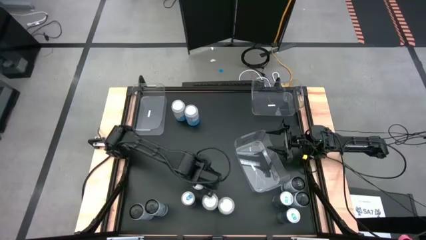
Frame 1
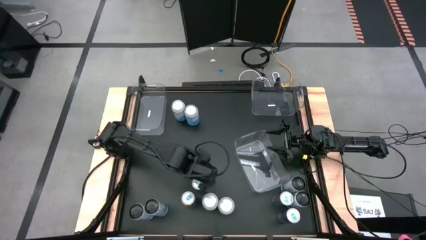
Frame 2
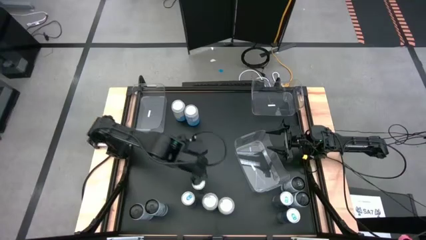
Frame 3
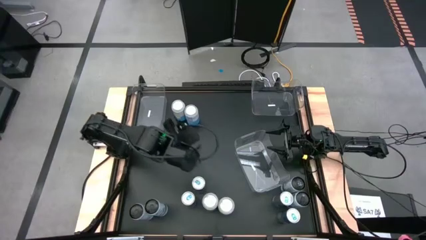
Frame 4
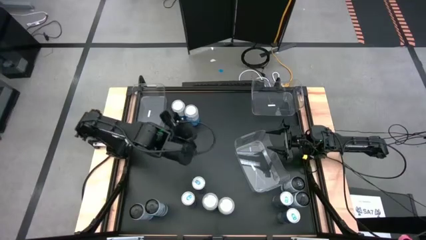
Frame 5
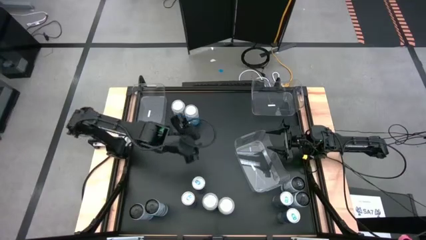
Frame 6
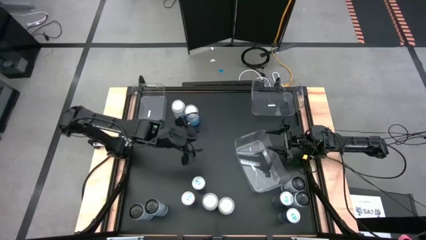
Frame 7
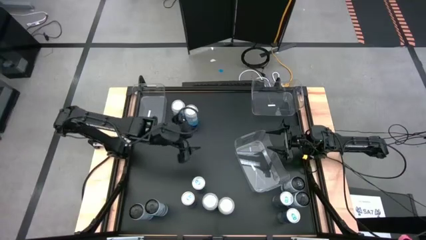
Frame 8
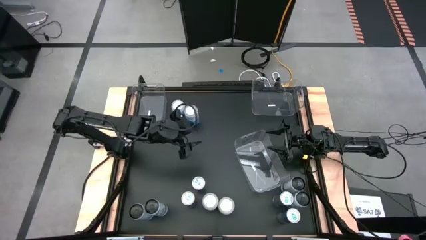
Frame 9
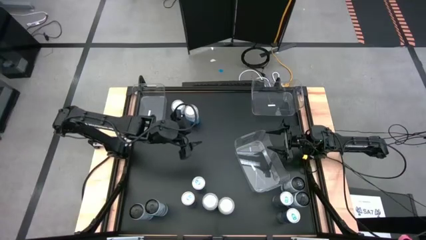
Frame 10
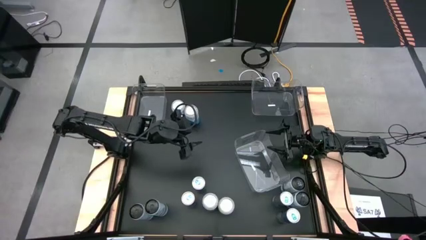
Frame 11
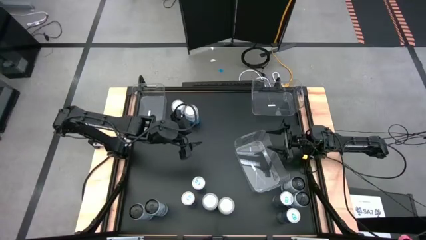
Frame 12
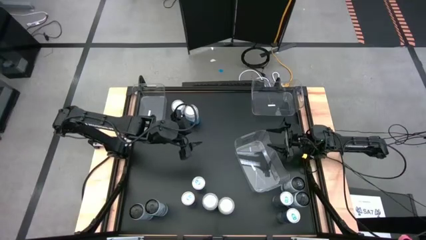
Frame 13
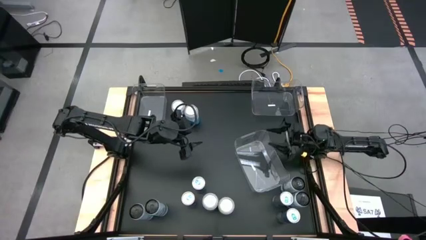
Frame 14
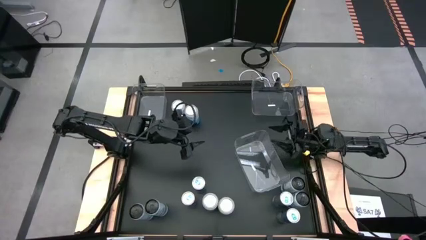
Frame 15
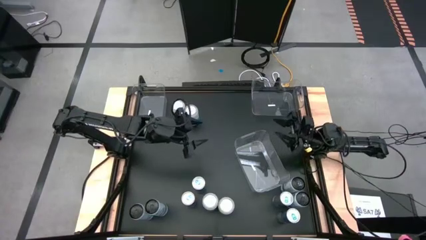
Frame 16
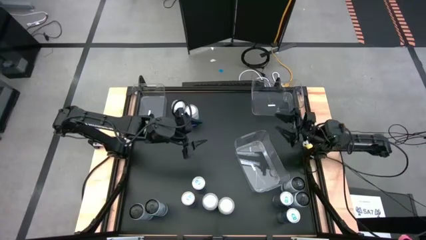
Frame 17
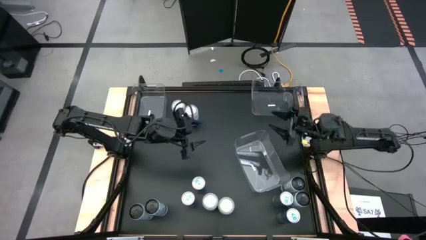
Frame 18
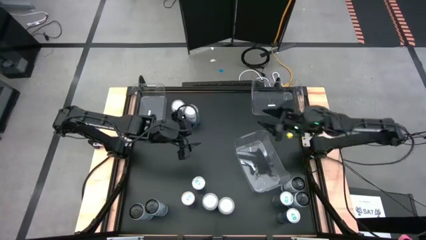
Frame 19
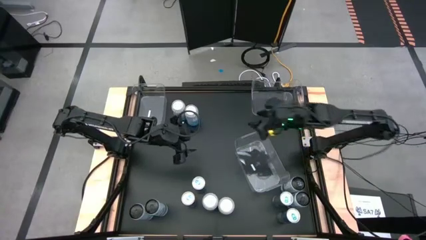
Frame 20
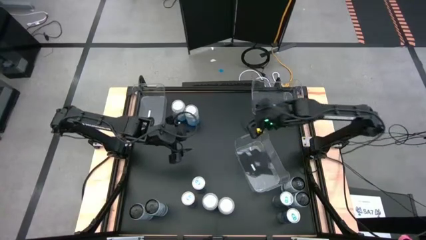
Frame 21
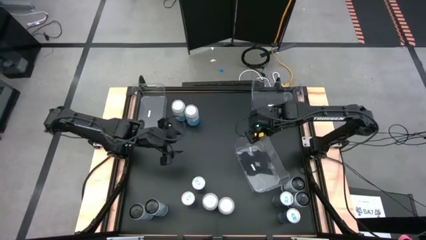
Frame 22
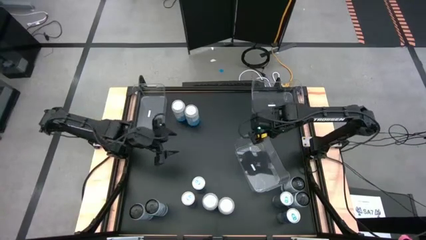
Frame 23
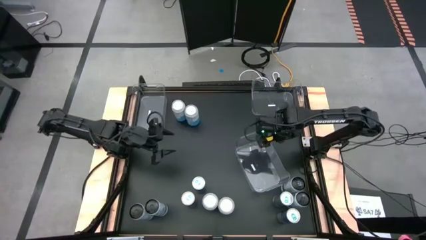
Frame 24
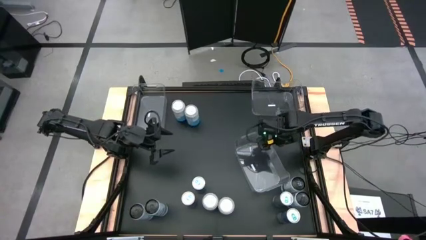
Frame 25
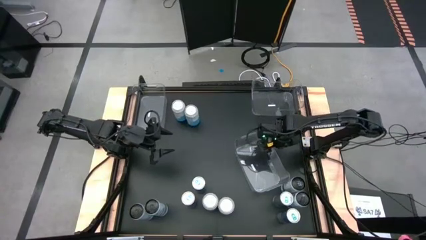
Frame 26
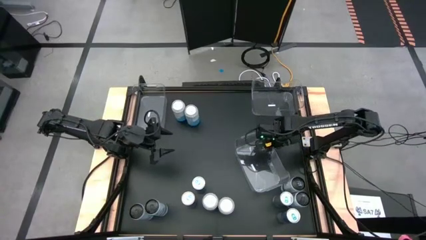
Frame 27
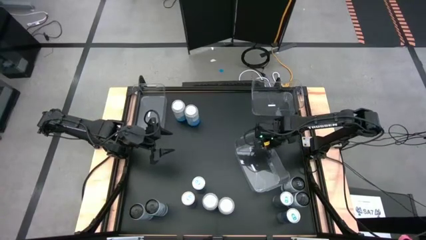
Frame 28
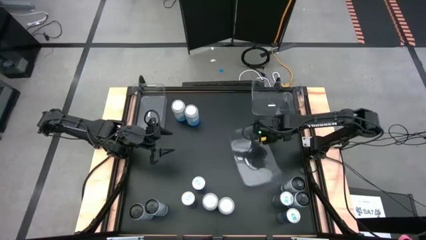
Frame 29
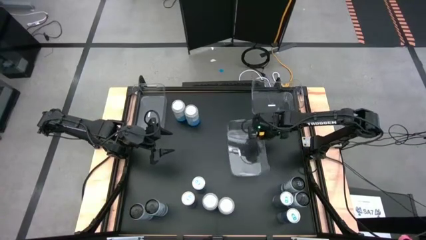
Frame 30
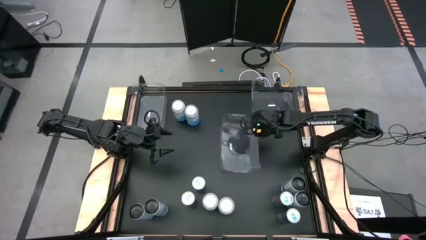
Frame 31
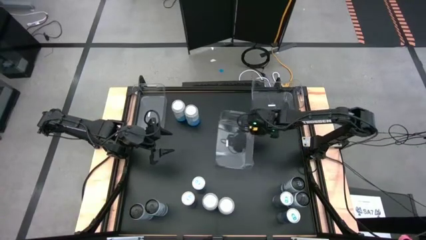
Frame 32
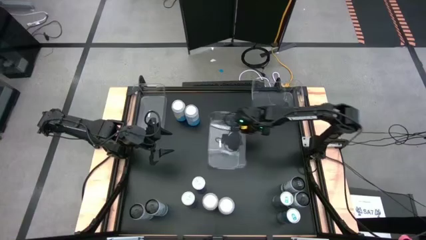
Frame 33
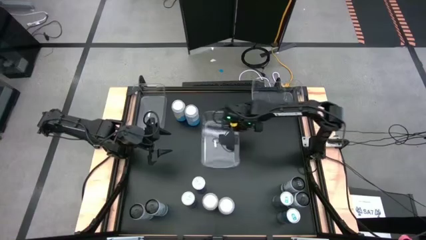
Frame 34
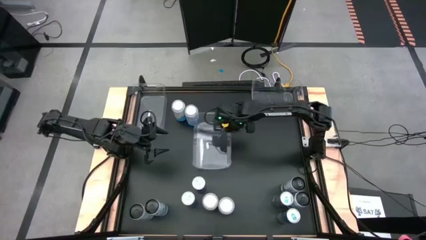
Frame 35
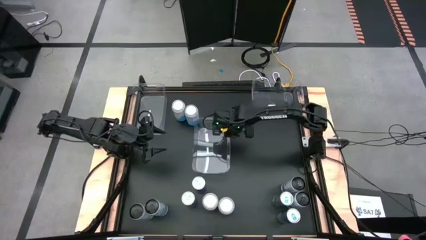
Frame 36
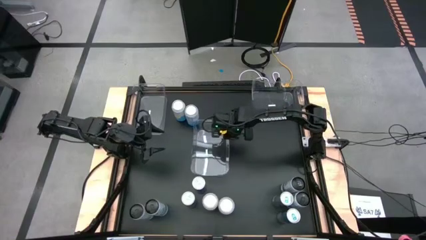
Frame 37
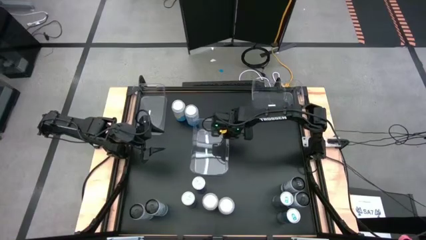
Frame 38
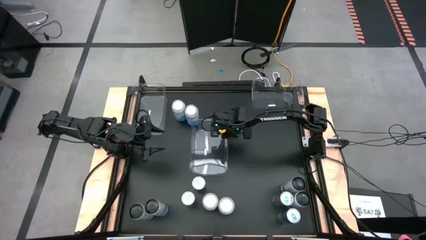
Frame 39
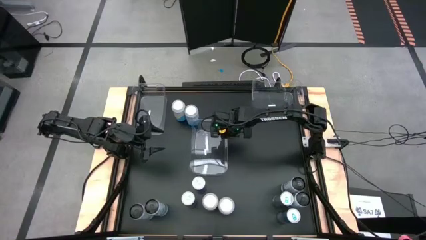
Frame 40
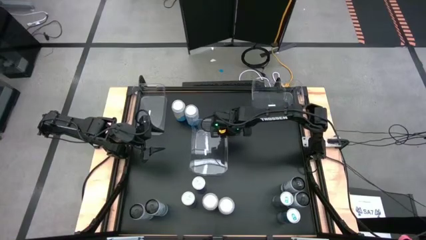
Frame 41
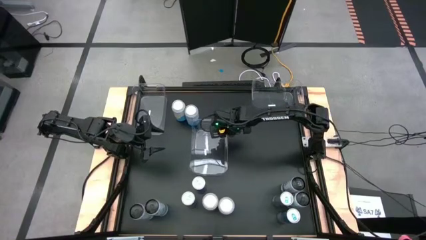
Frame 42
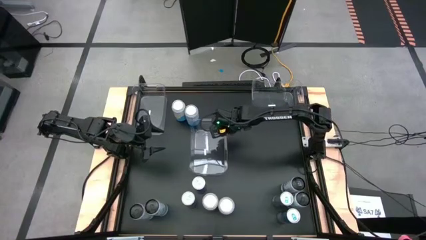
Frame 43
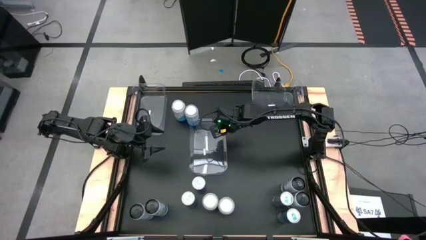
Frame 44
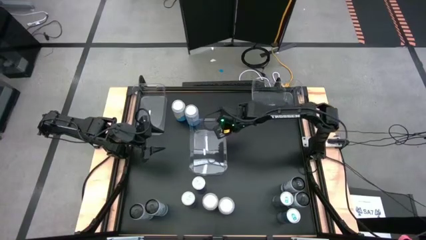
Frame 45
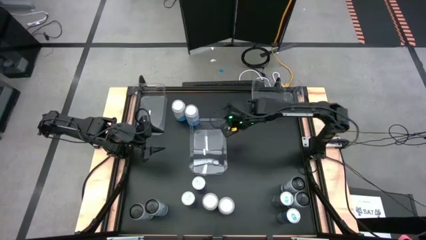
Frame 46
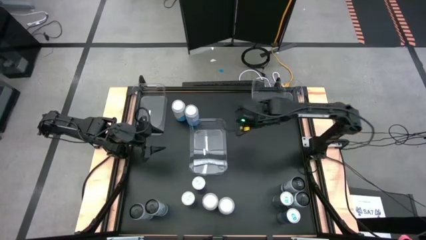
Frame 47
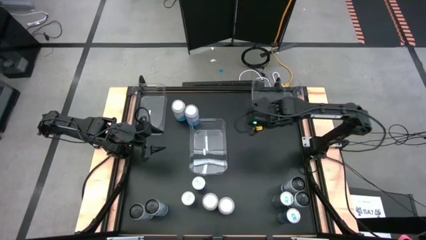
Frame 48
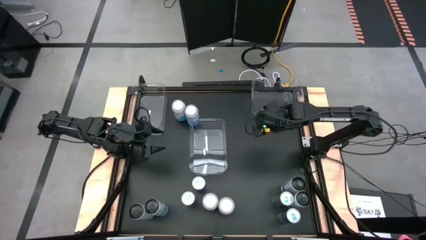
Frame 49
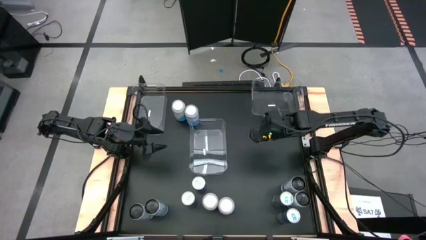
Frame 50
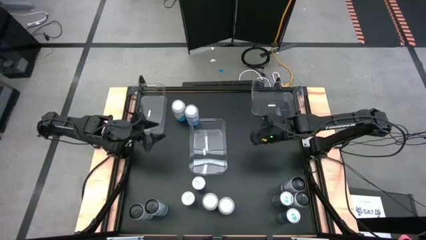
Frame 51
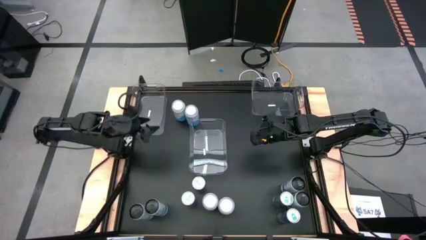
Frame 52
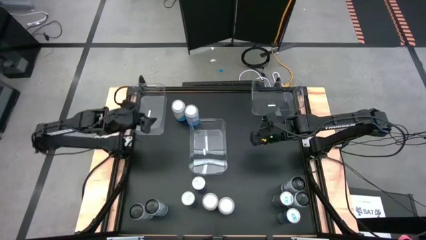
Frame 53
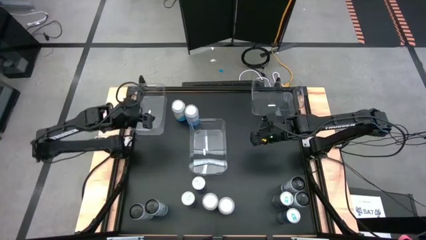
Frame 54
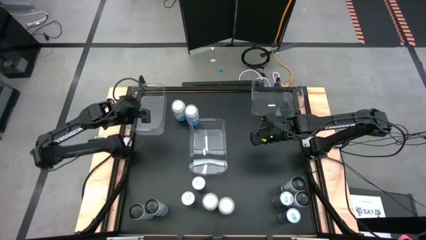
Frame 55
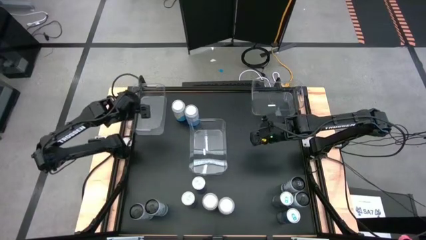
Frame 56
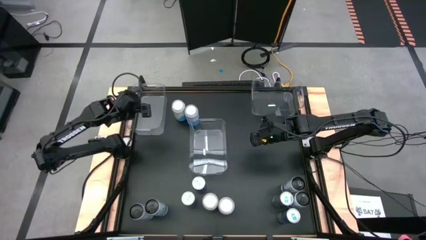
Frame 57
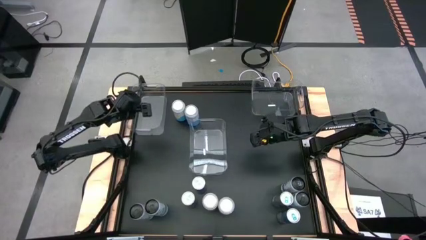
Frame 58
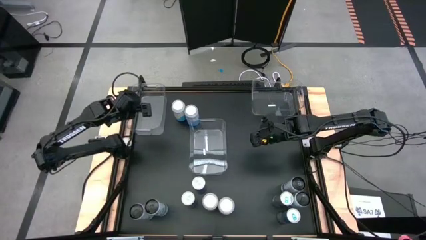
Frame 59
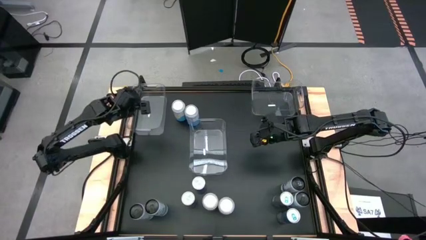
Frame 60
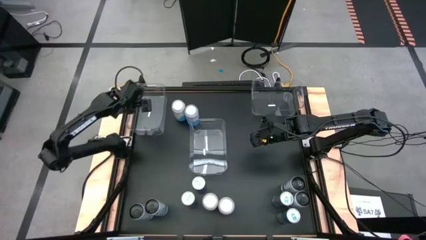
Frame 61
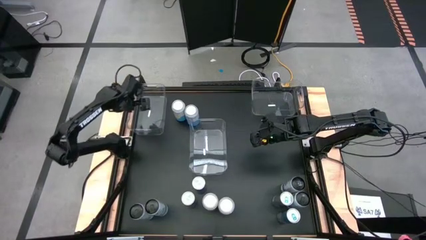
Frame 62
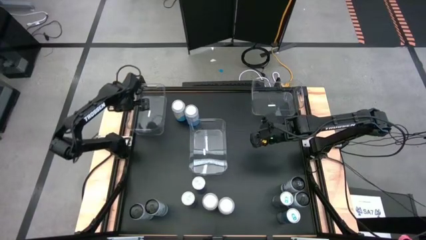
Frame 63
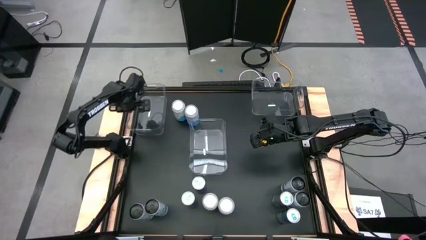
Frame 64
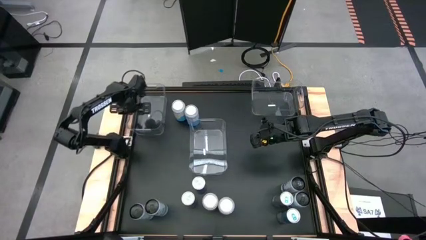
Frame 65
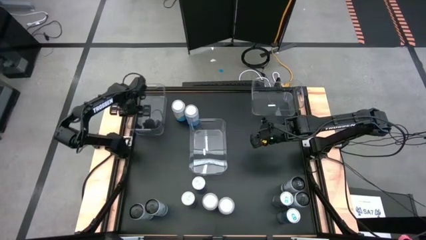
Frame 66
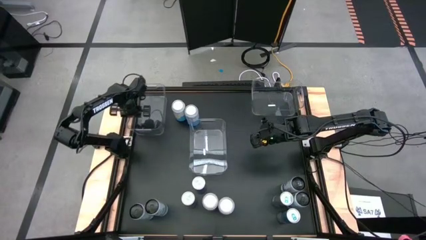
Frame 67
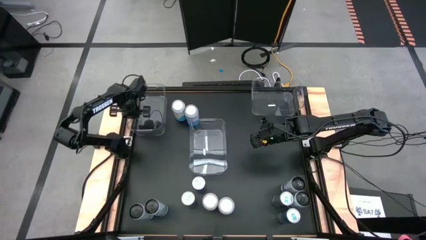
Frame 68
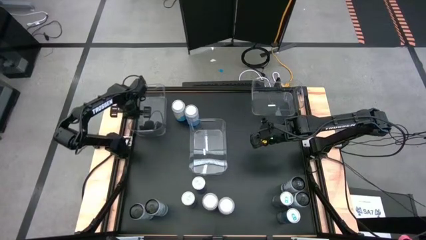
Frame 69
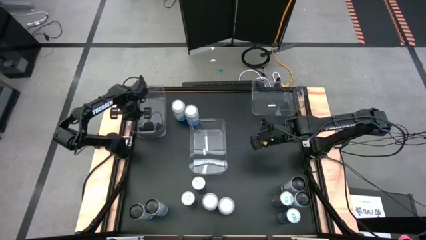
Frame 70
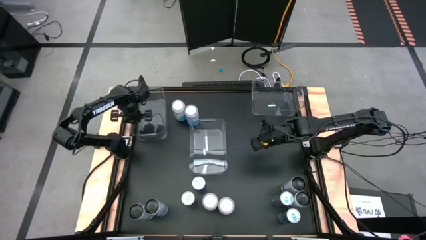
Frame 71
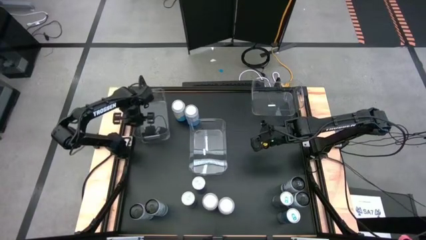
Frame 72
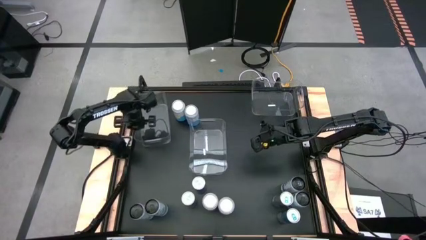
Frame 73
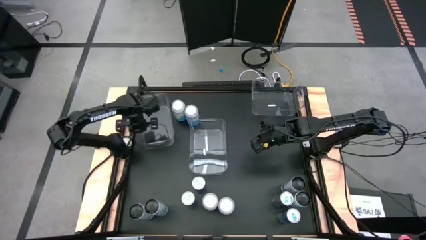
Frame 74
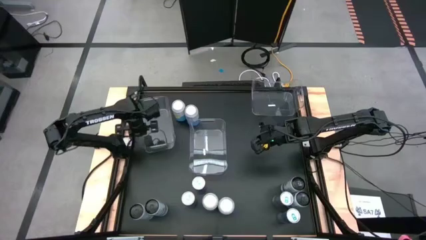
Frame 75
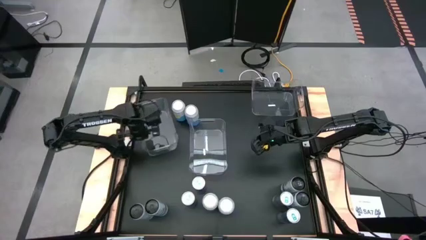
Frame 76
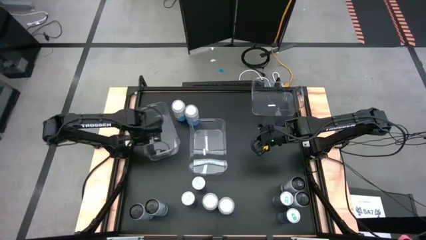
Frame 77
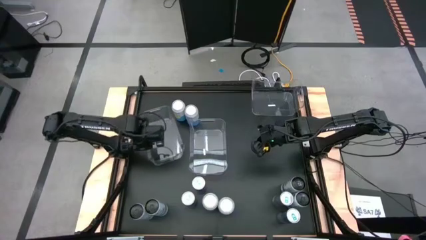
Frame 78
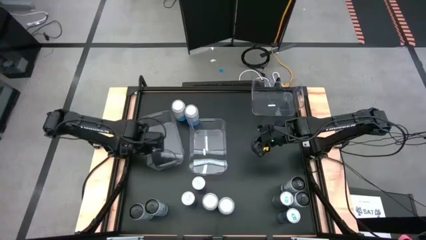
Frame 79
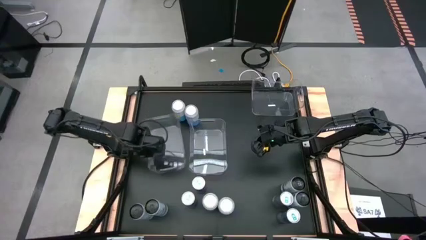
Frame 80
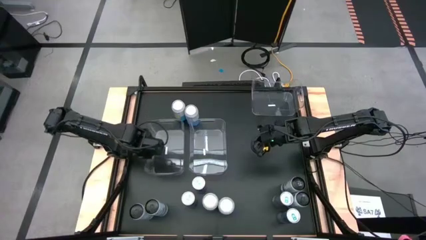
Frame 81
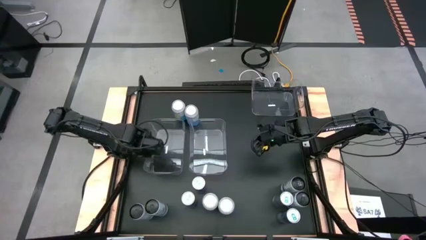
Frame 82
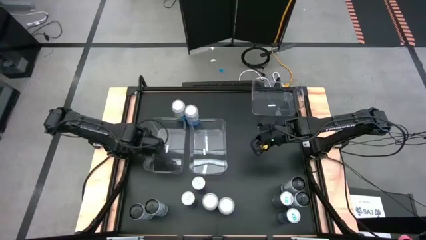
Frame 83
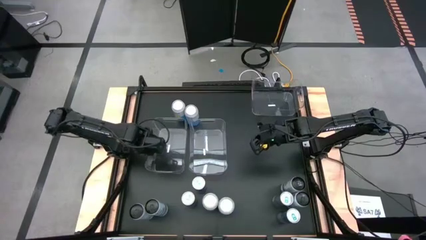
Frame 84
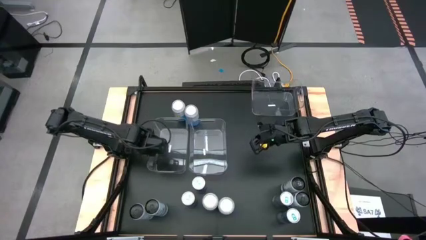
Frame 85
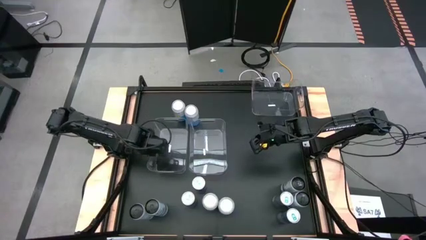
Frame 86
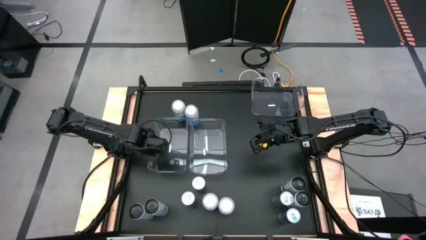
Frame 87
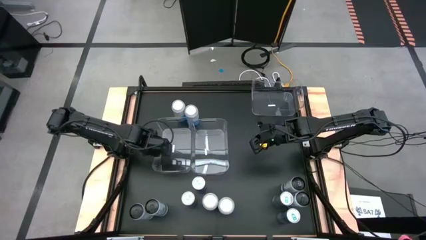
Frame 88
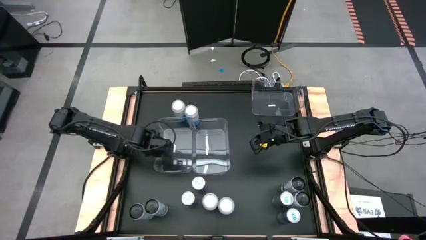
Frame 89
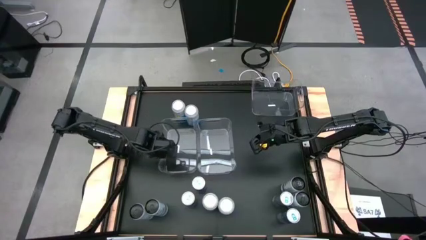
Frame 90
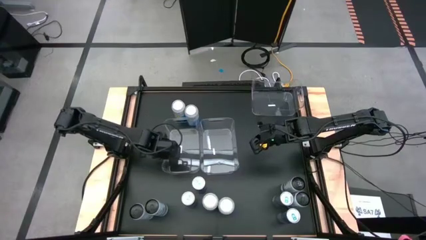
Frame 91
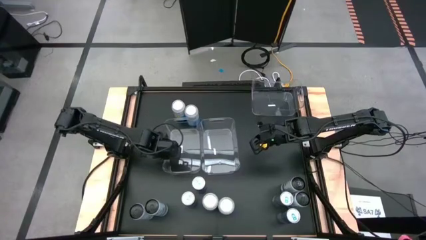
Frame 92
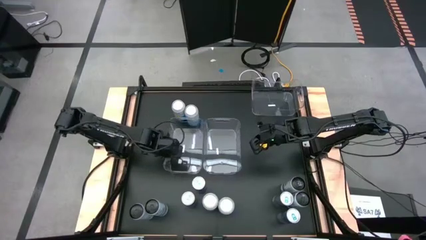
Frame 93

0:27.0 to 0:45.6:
Task: Sort soda cans
Move the transparent bins to the center
